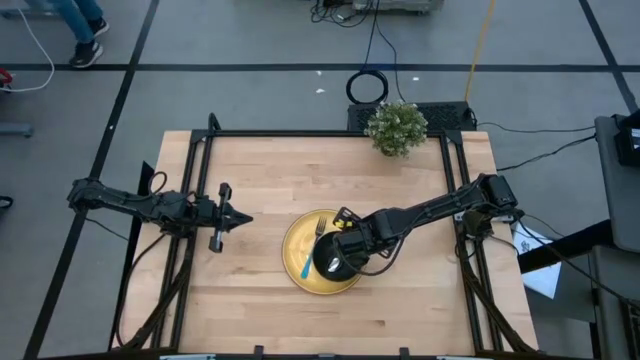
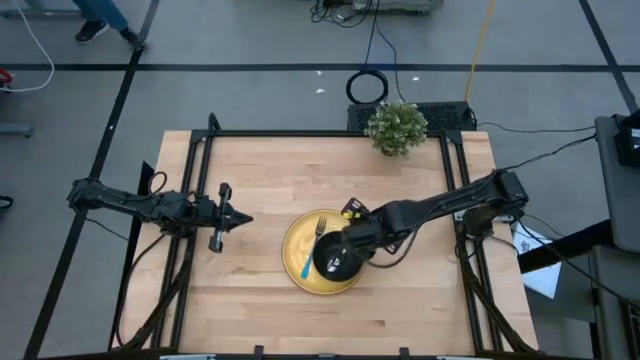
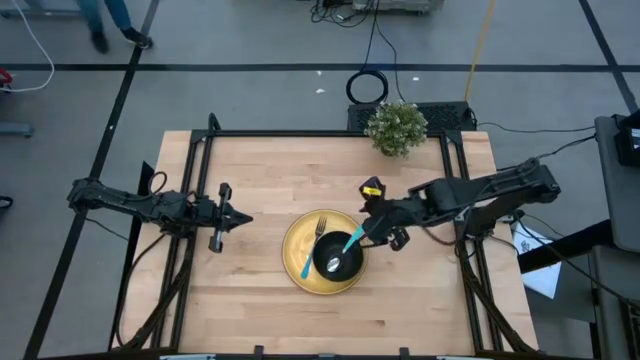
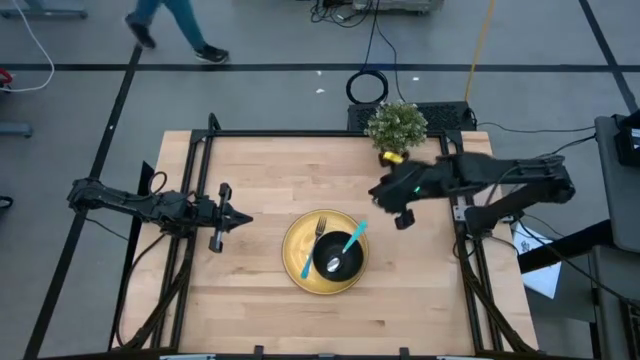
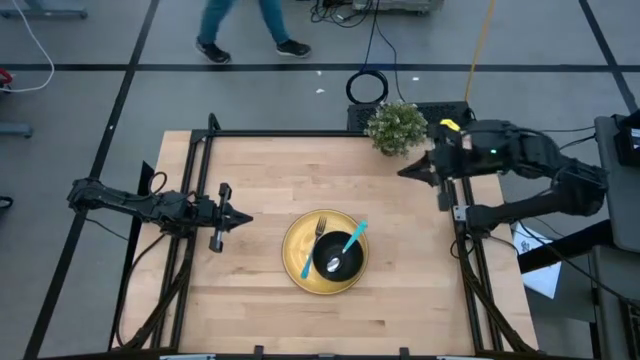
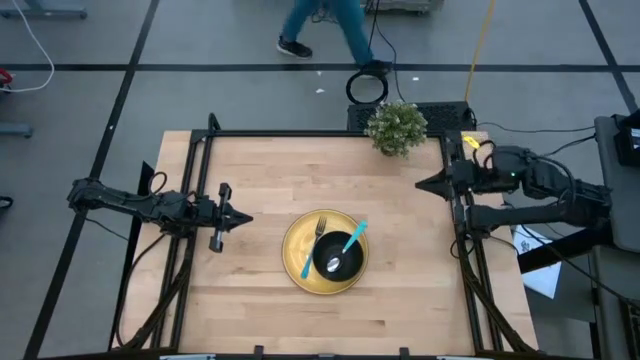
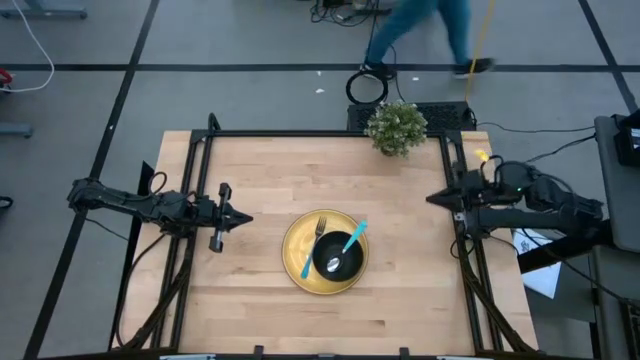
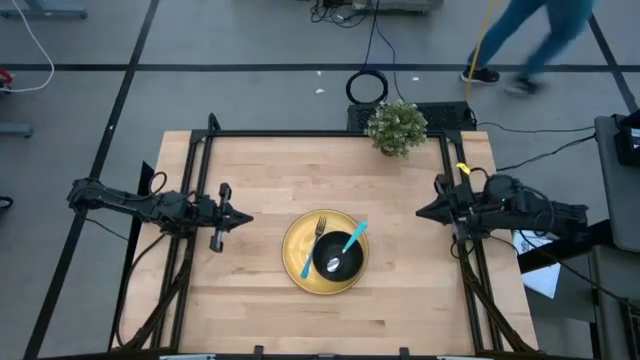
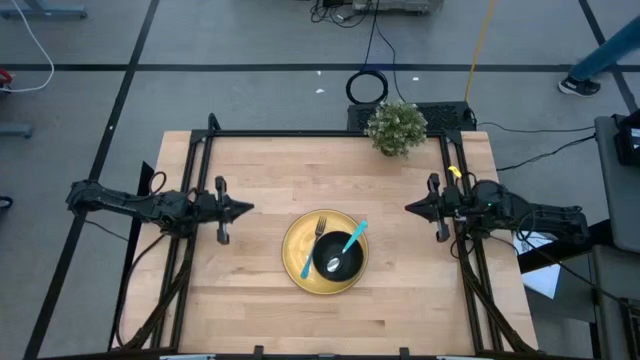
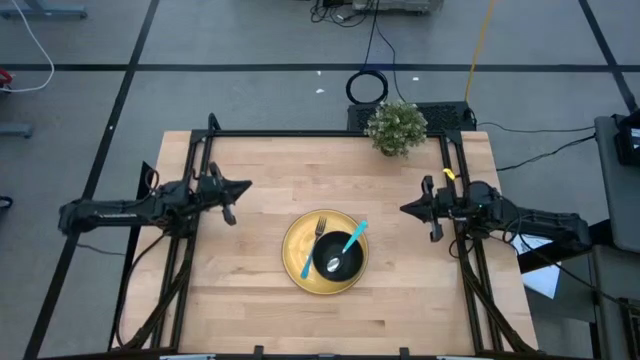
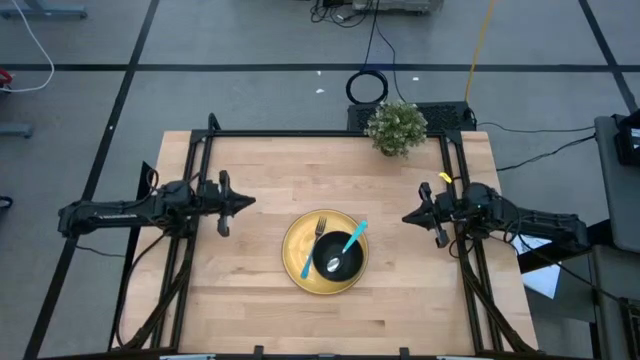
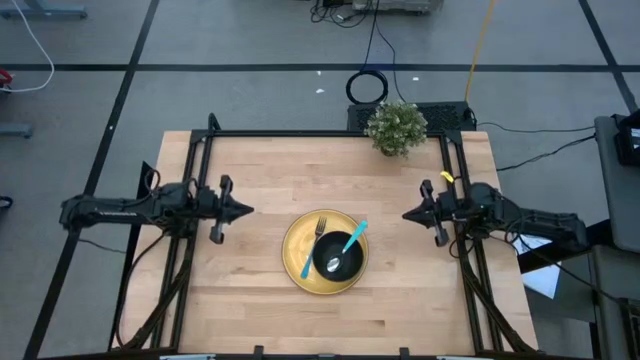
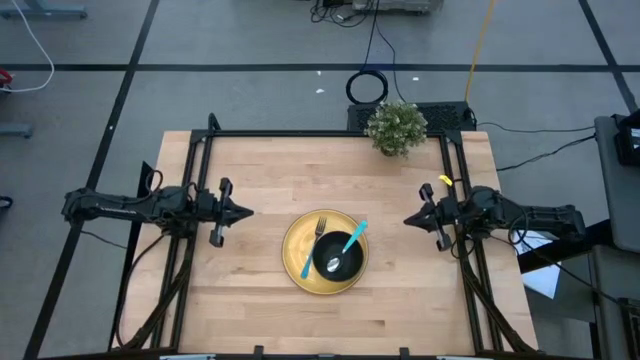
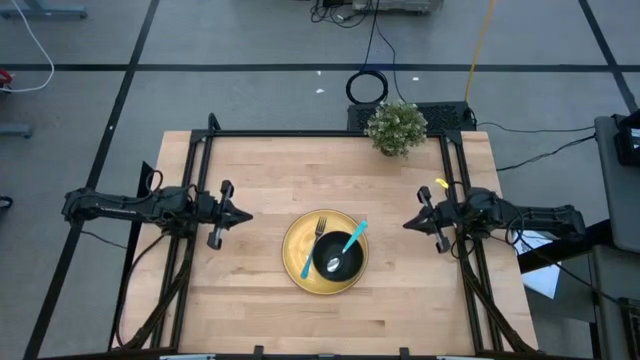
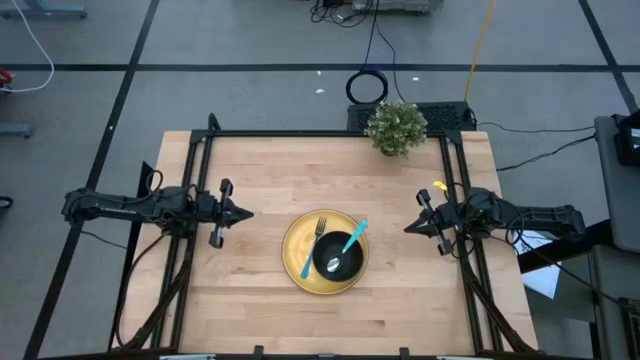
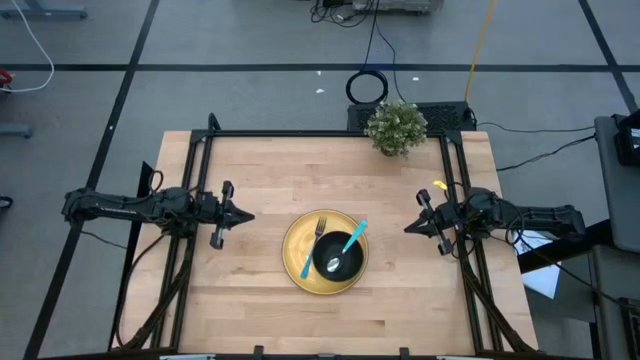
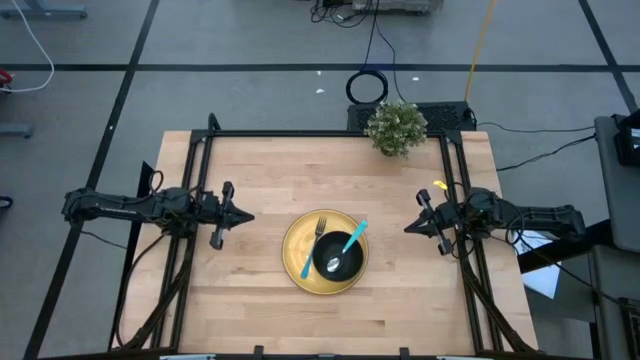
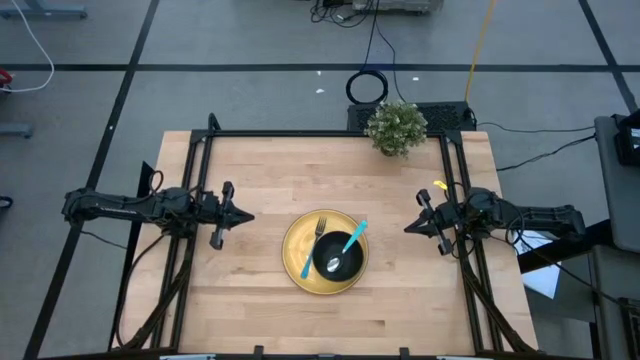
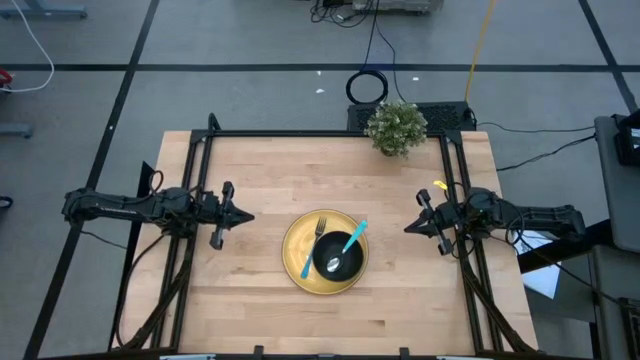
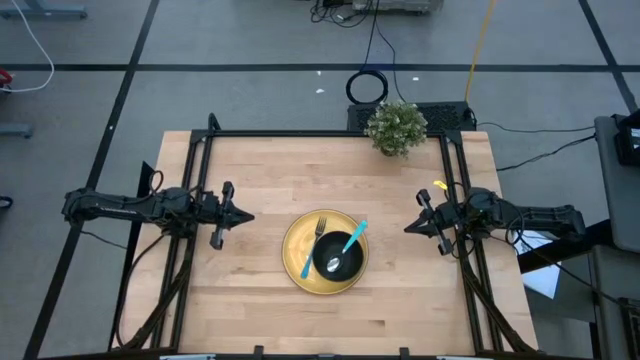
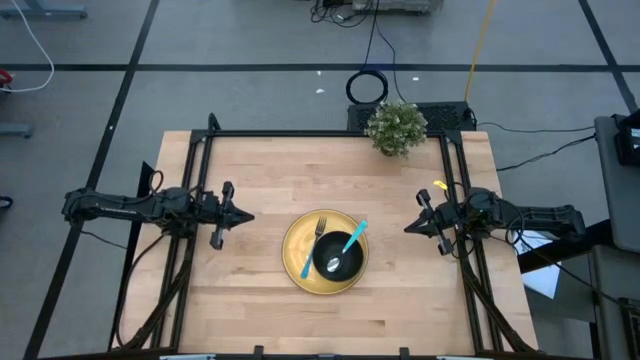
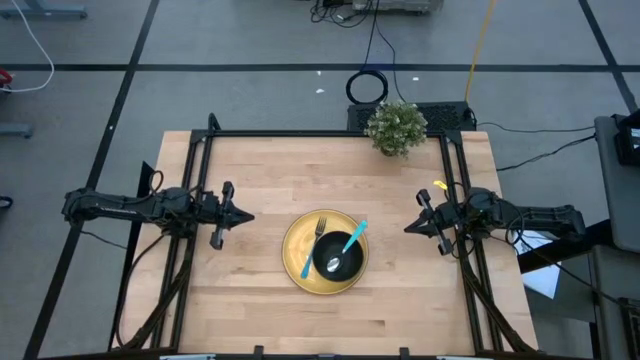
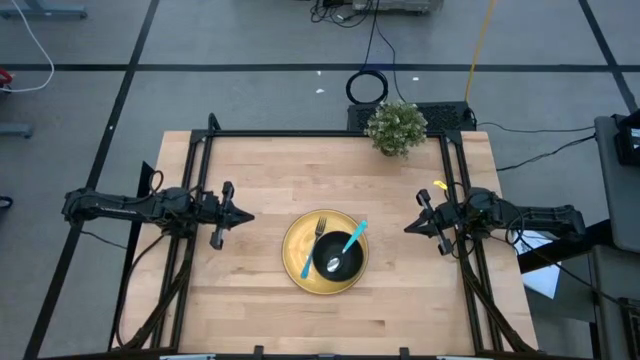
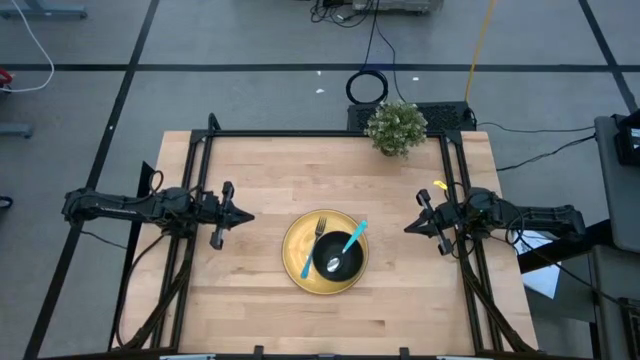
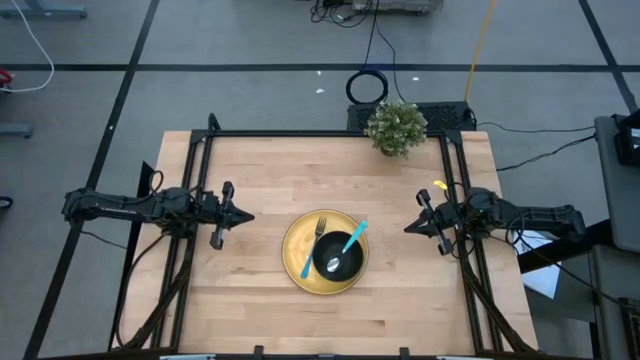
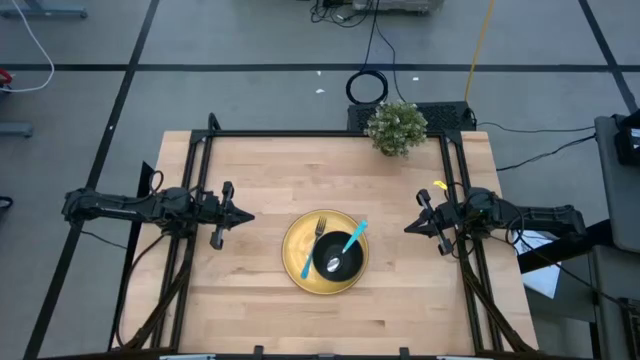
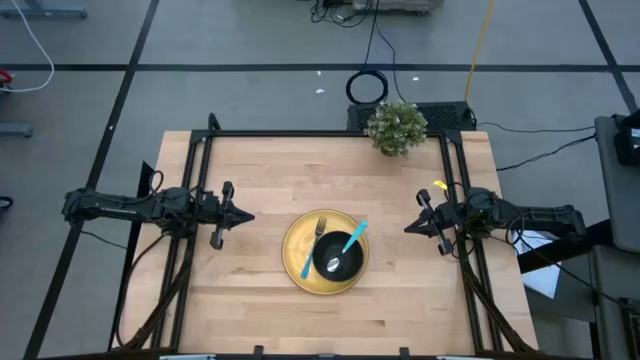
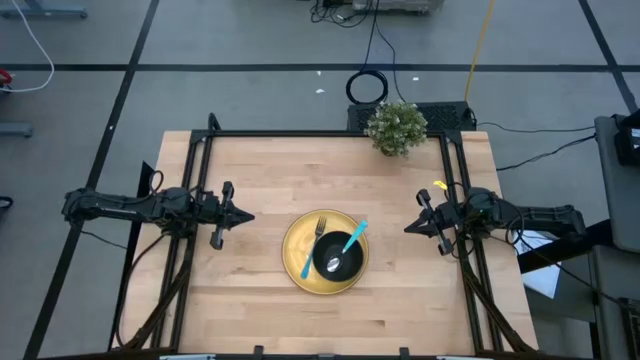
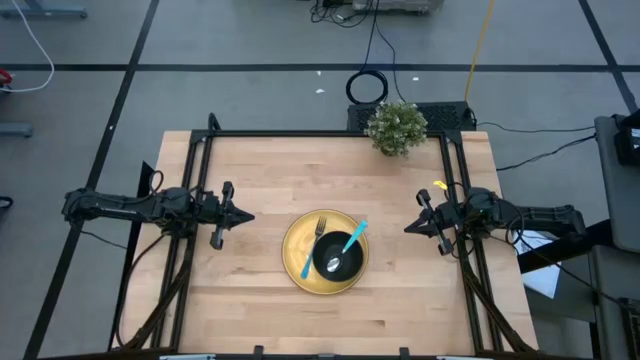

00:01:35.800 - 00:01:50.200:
Task: Set table place
Return to Home Position

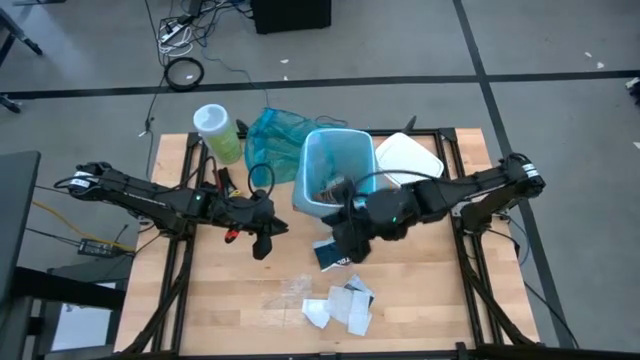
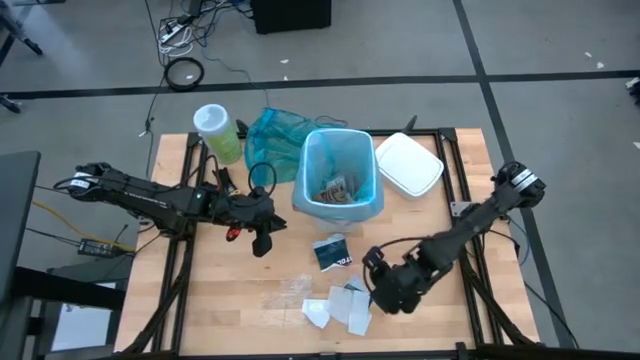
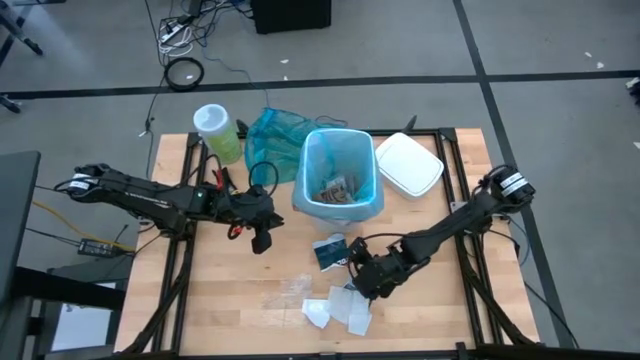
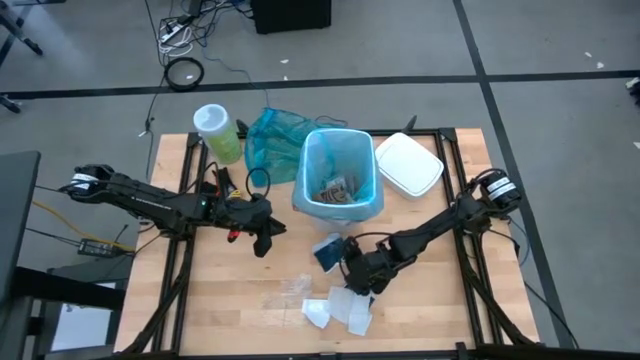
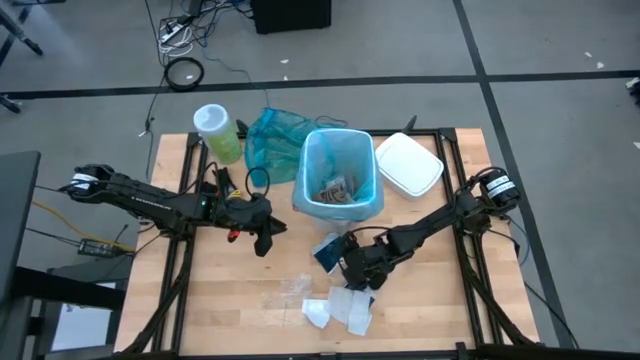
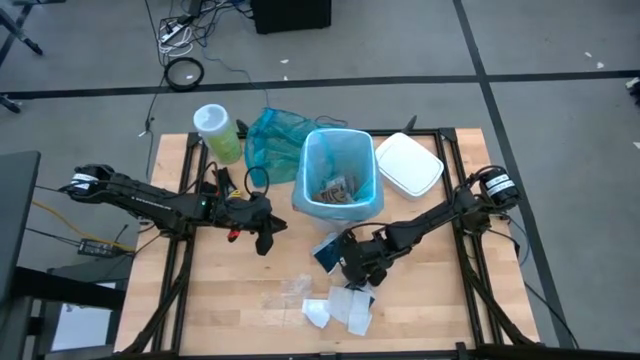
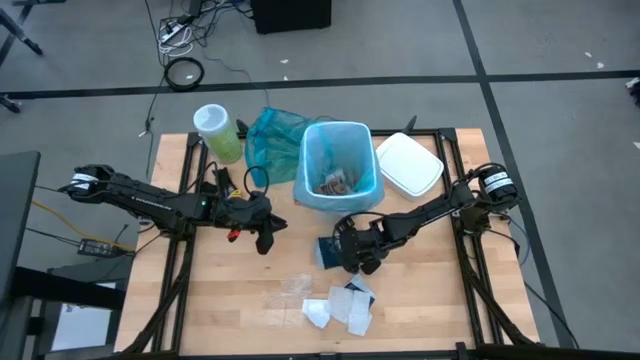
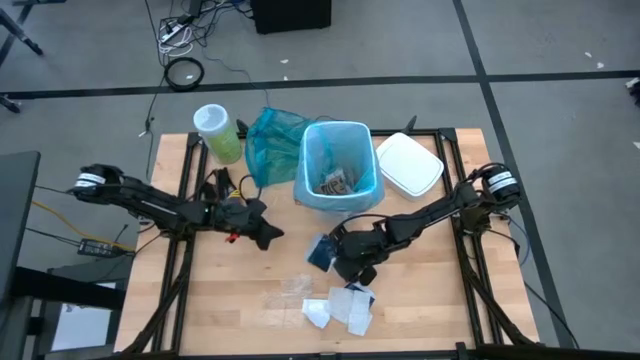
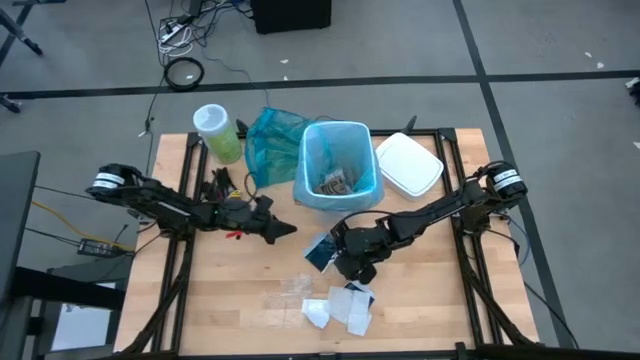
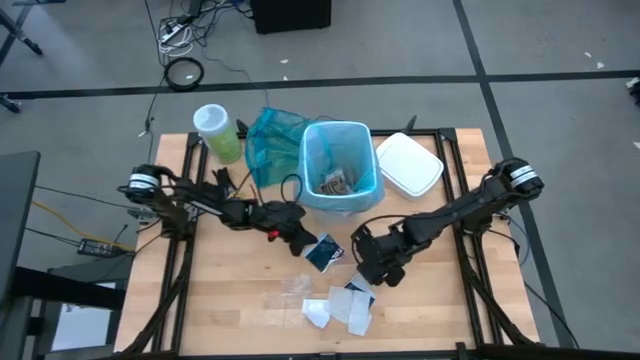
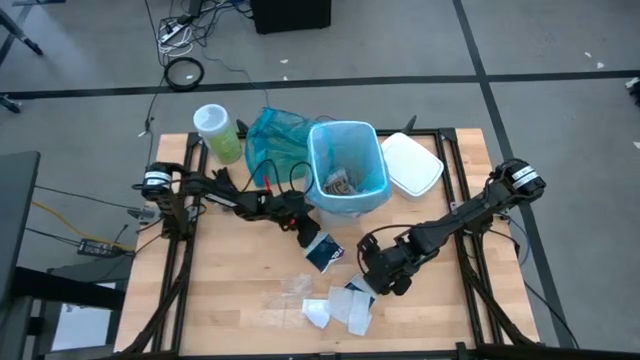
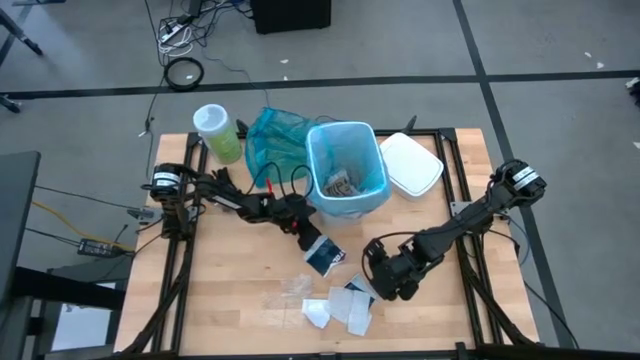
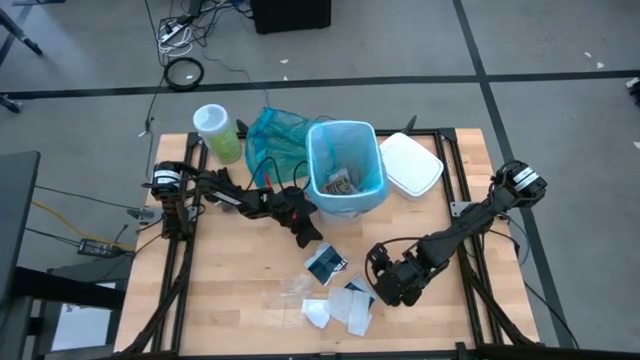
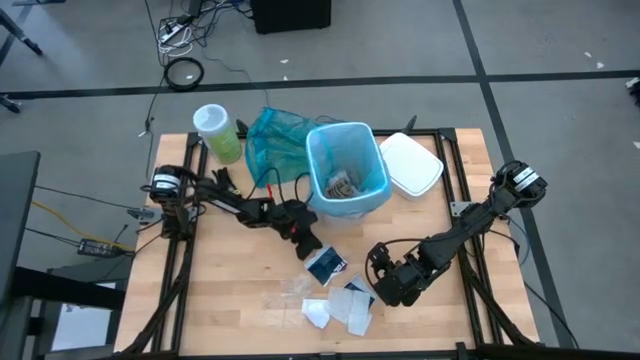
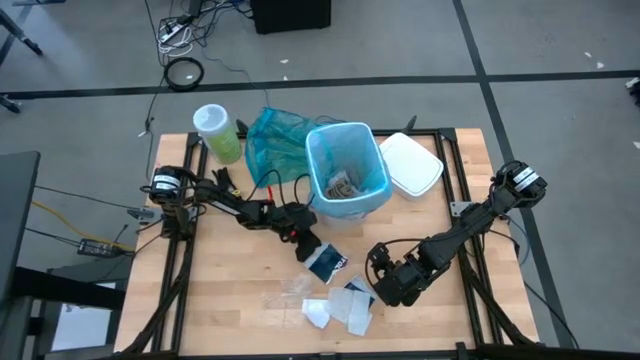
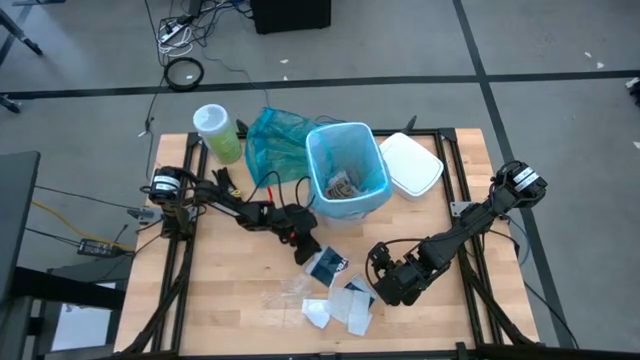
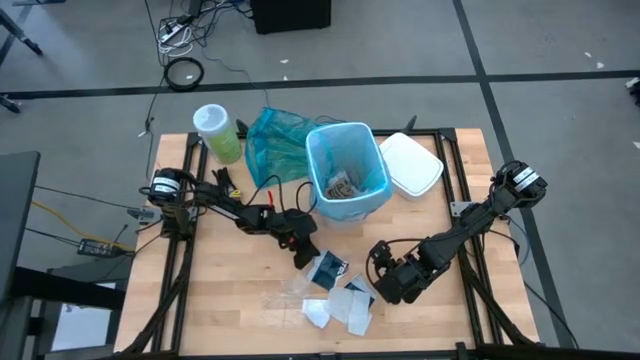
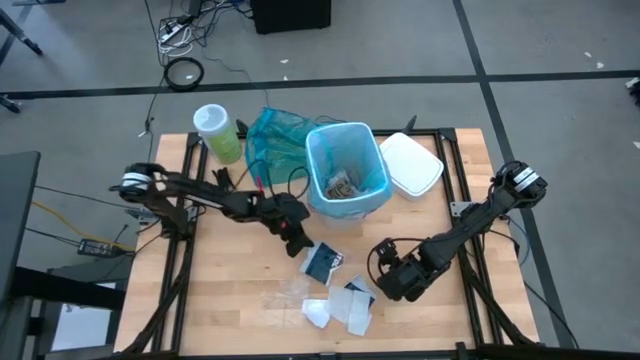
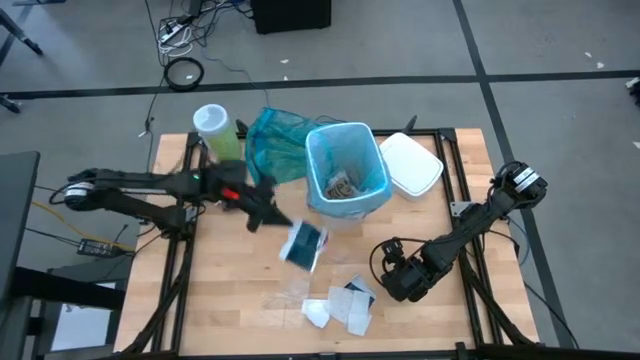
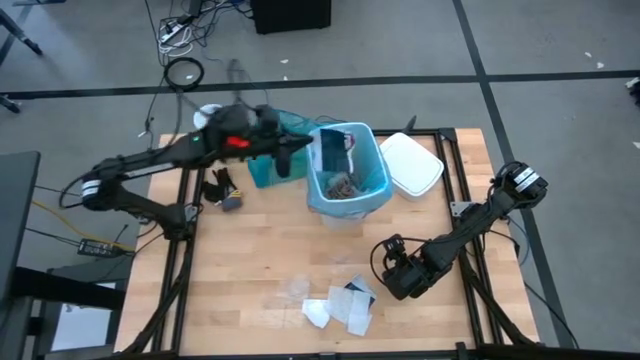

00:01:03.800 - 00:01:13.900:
Task: place trash/remove bag and relplace
Put the black paper into the white trash bin
